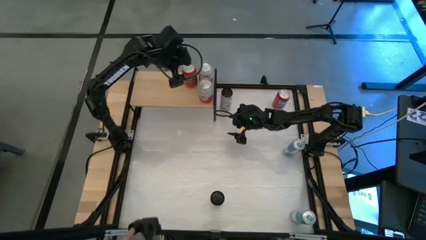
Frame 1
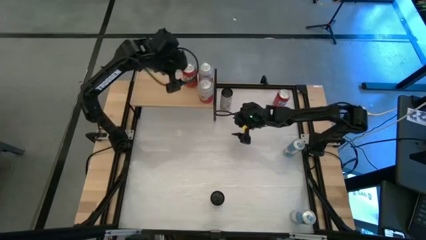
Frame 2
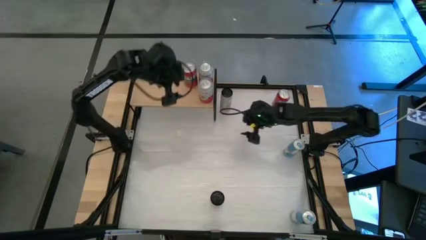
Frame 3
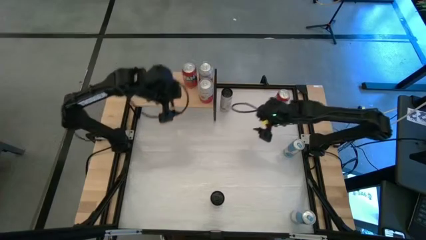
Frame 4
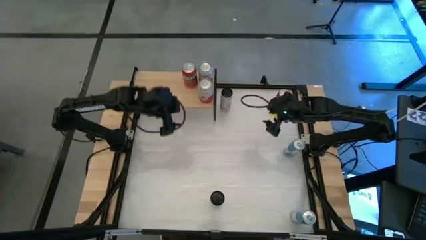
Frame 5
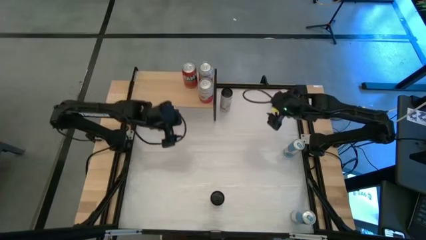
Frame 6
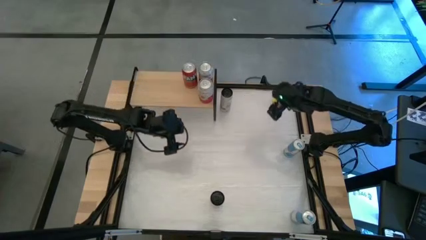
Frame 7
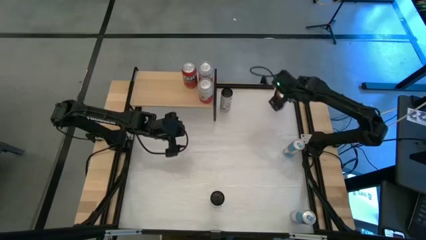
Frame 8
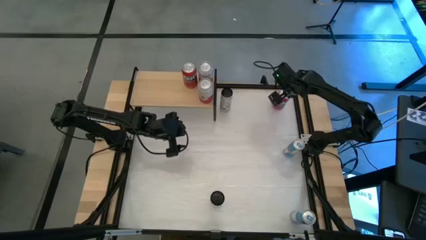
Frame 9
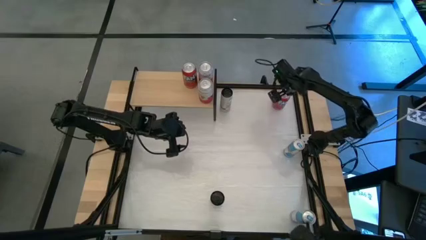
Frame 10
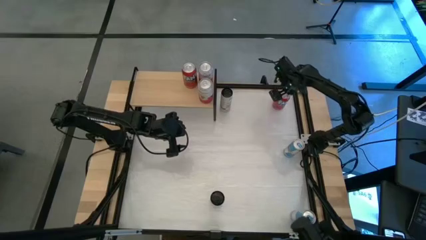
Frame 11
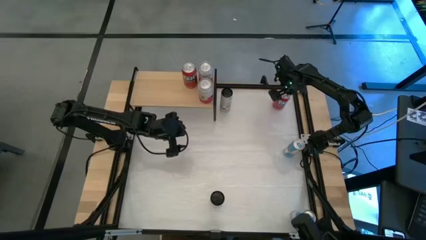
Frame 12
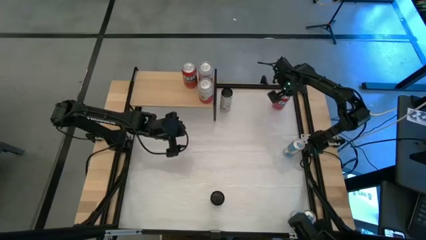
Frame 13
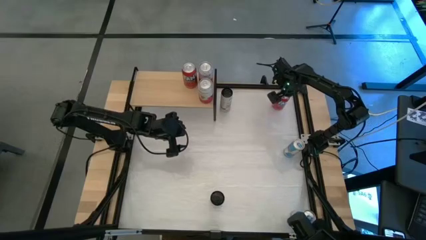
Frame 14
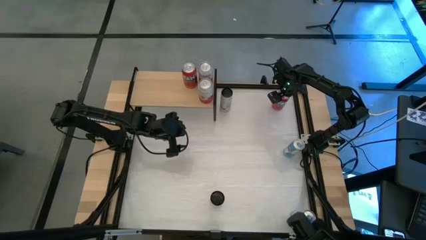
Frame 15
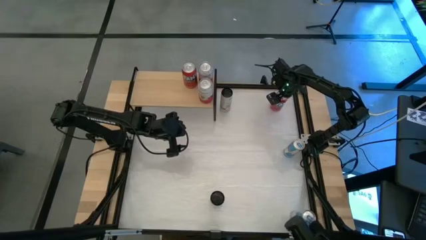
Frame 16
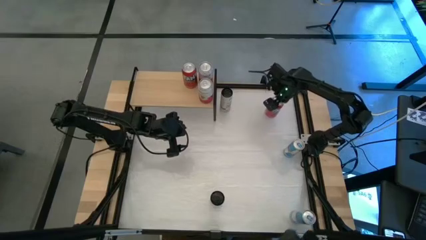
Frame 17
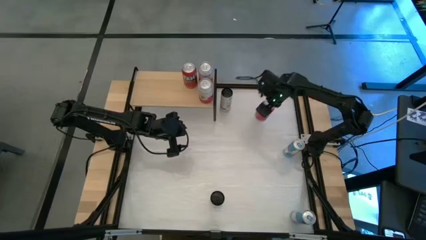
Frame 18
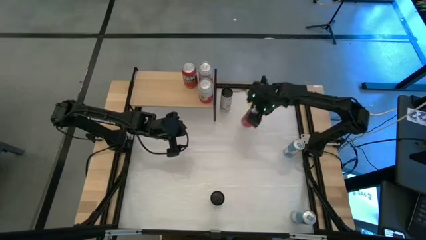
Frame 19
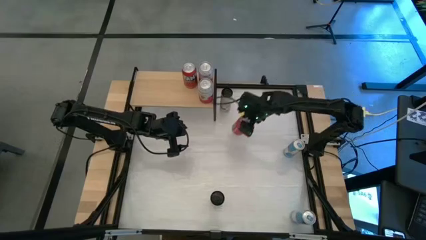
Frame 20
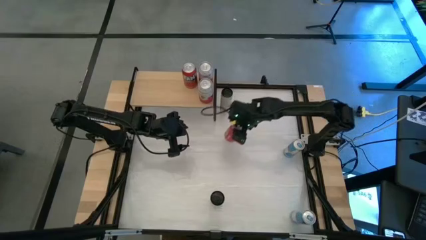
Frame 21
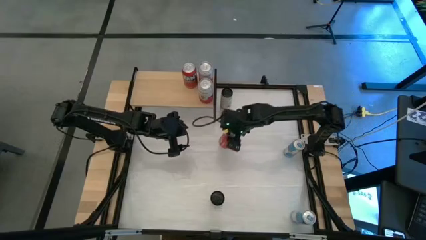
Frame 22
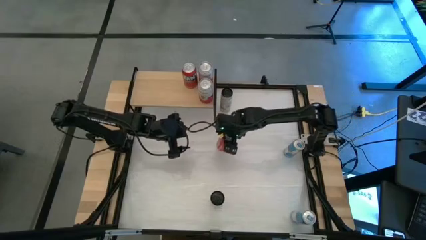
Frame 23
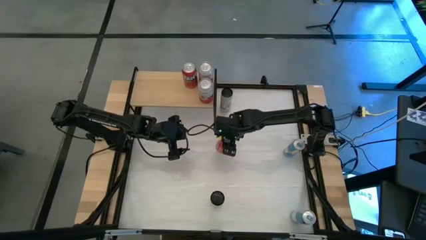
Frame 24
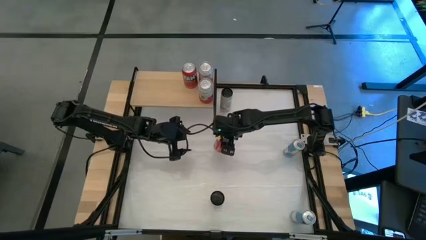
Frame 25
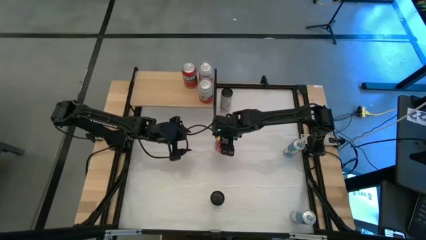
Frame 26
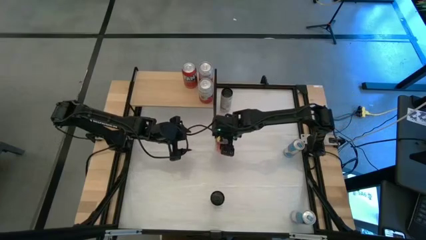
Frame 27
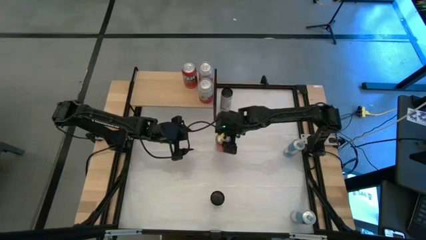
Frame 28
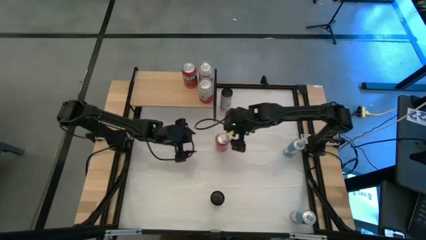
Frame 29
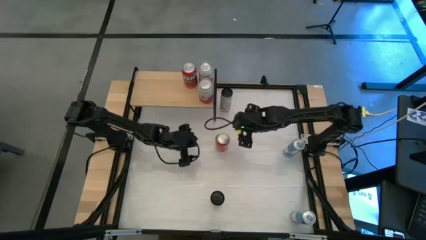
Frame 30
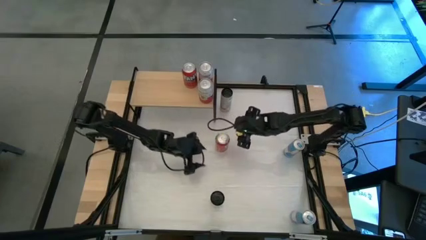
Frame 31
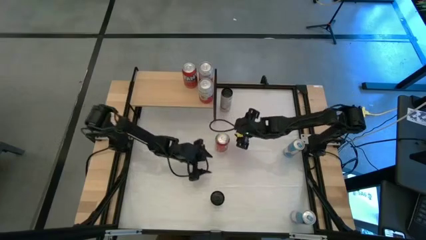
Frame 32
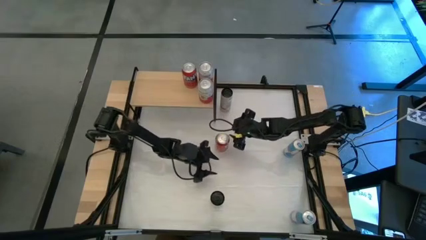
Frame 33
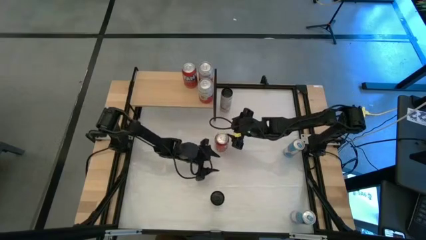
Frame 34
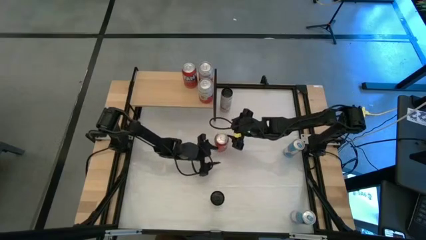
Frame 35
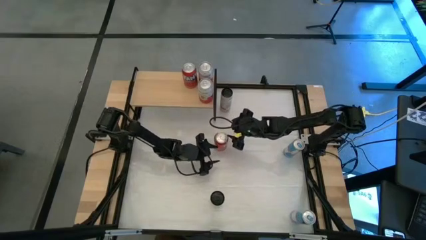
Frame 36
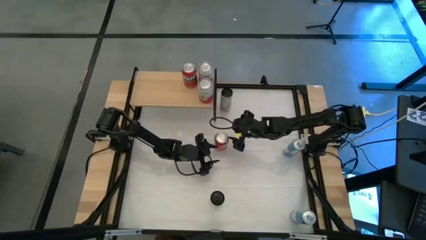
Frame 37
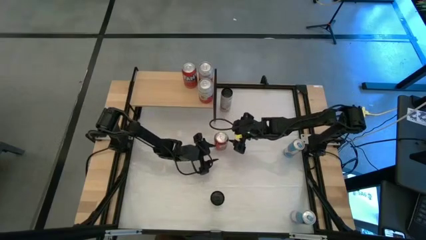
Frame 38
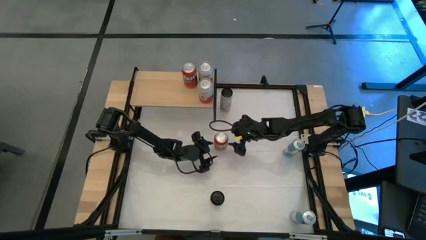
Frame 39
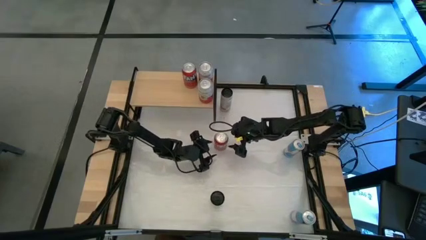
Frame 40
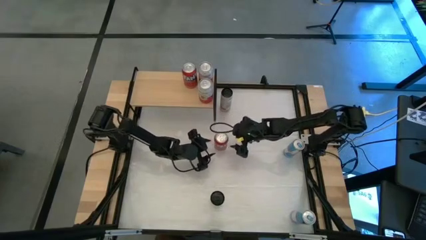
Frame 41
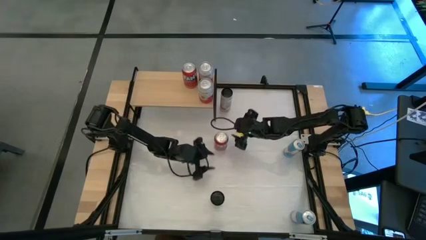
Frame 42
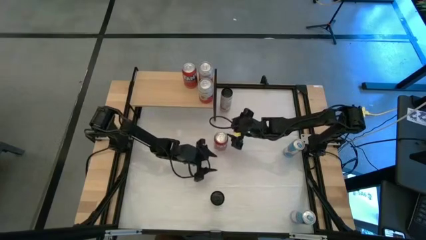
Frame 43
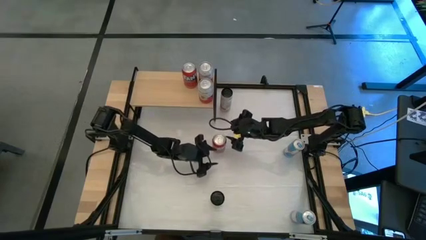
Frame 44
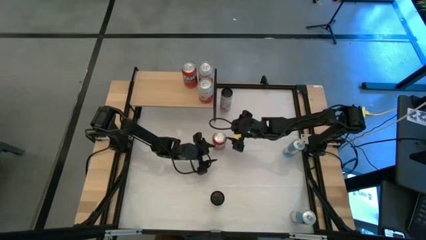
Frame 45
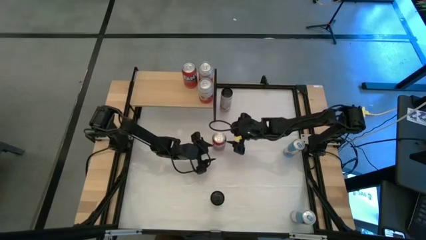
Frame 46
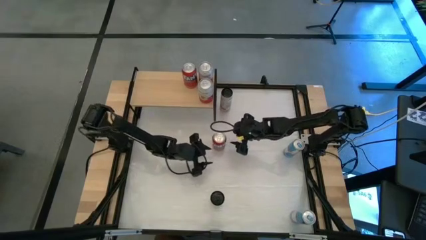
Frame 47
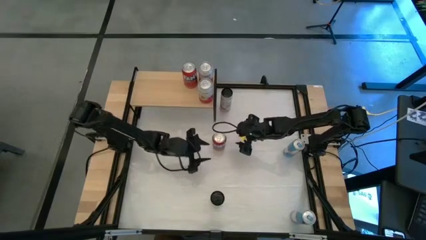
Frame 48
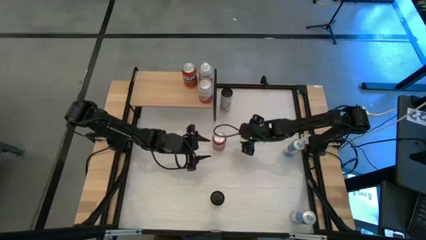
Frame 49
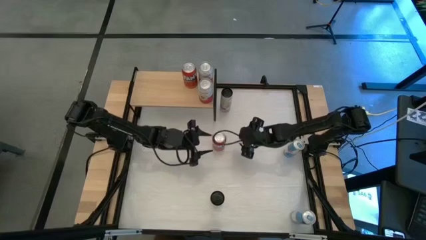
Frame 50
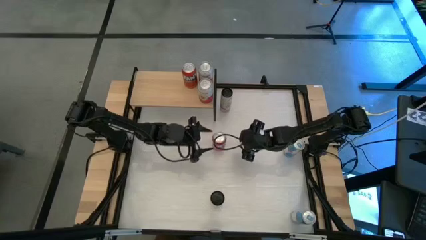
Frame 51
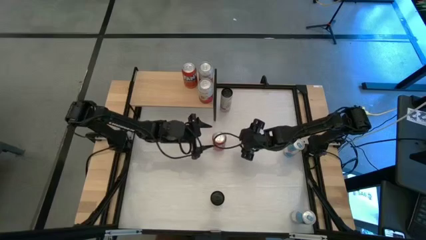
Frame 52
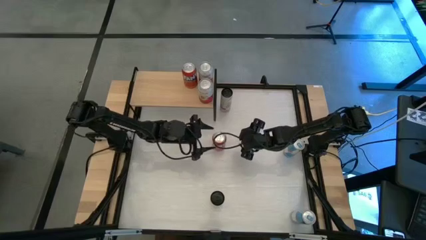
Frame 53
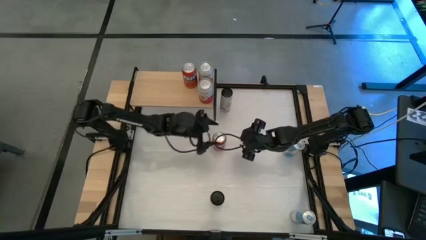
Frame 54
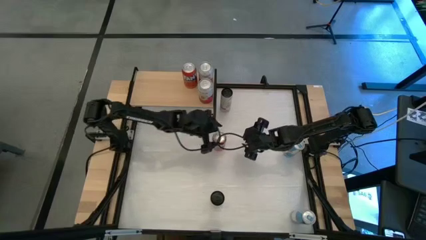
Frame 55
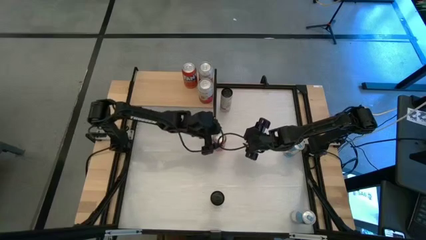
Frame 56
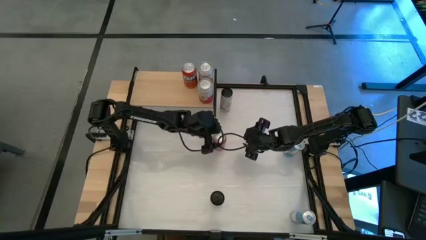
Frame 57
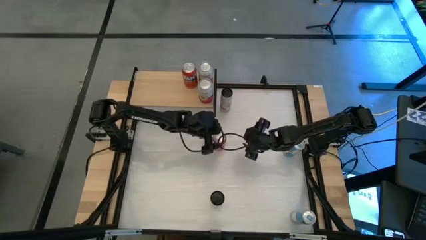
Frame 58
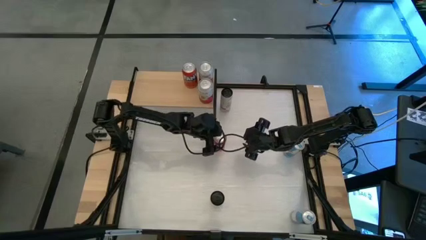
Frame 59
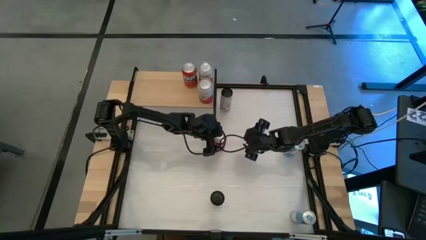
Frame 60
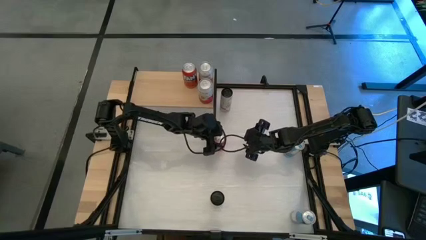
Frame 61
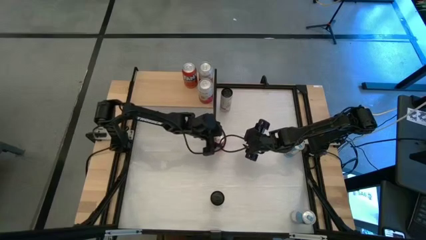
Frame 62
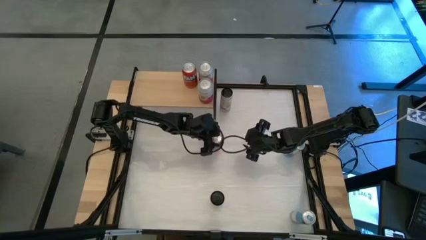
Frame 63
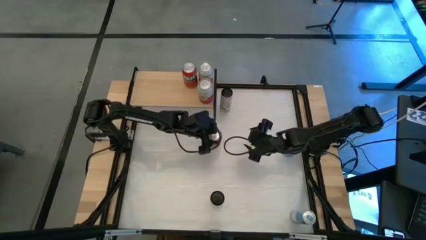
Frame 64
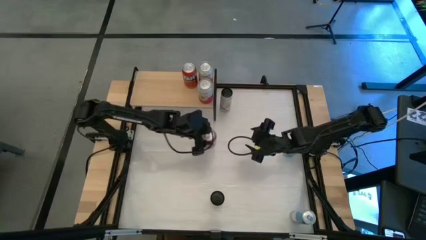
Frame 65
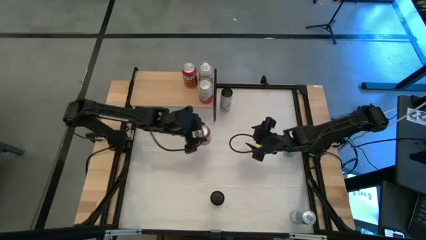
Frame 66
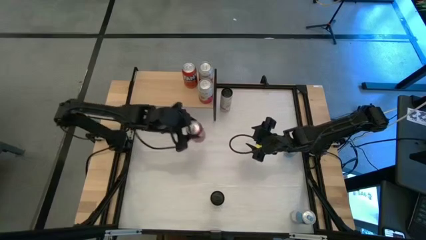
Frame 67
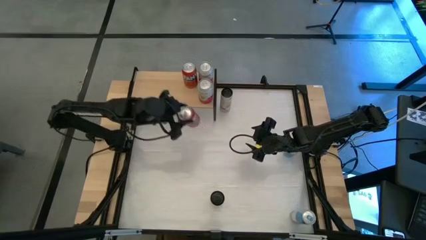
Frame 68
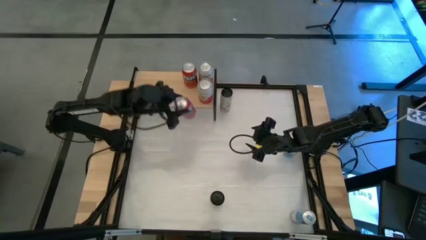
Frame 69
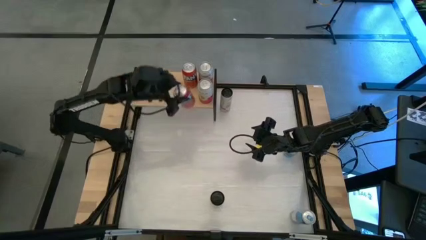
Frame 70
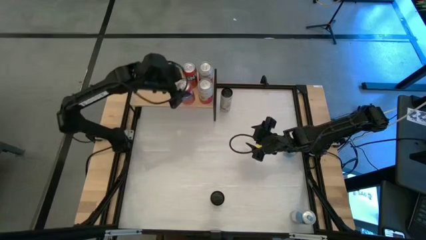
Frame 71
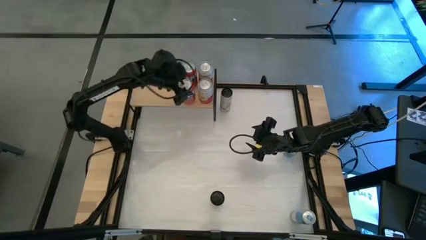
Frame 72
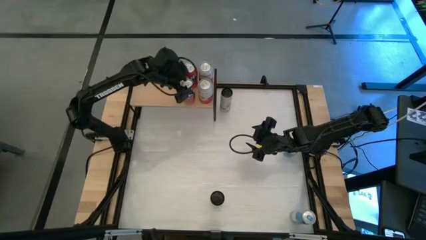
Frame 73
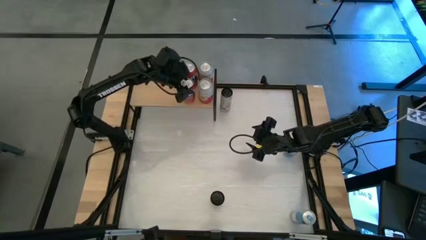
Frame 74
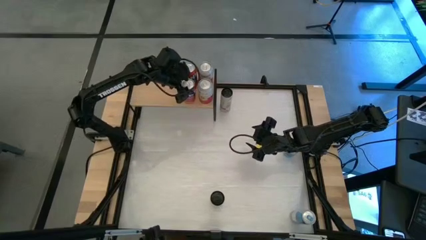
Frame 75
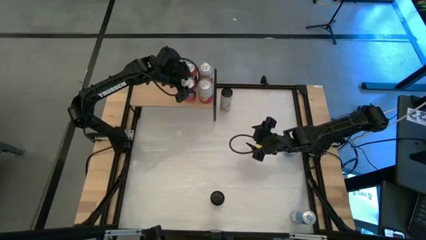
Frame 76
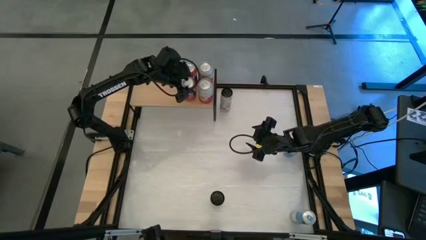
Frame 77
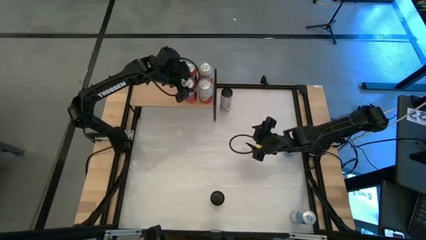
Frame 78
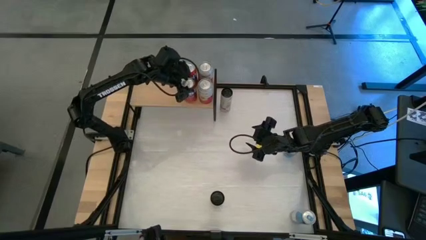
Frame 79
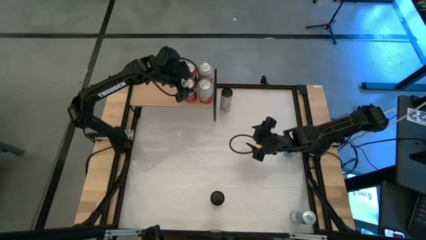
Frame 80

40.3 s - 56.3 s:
Task: Place canned beverage on shelf
Put the red soda can on the shelf aligned with the other red soda can
